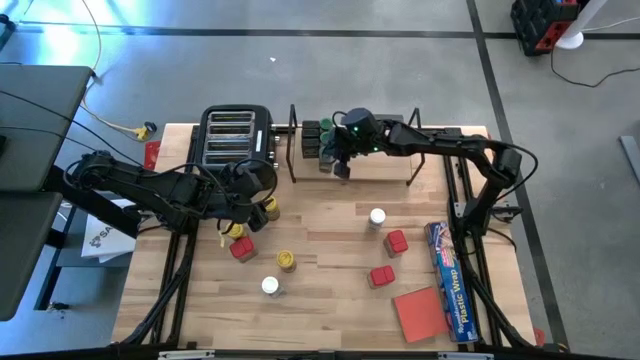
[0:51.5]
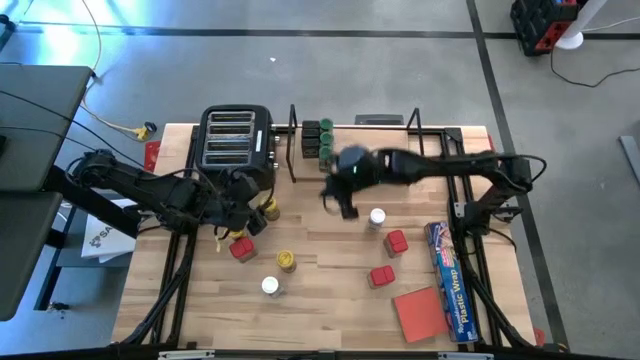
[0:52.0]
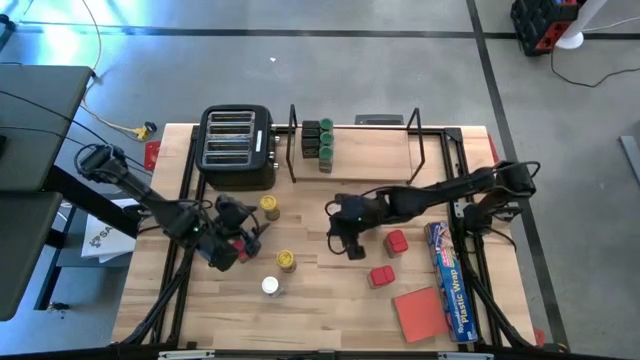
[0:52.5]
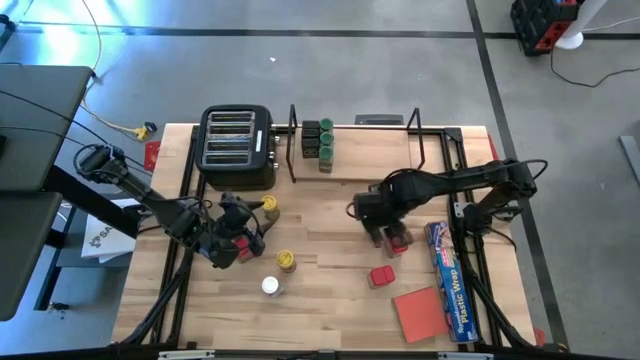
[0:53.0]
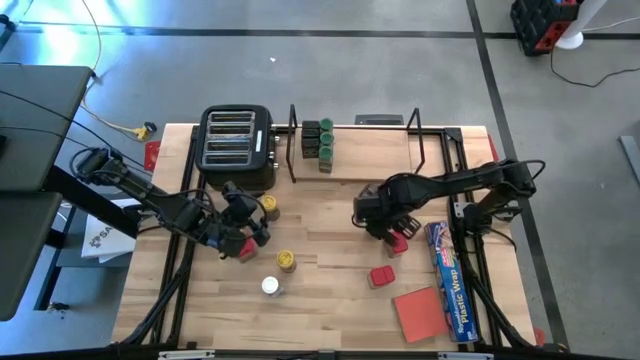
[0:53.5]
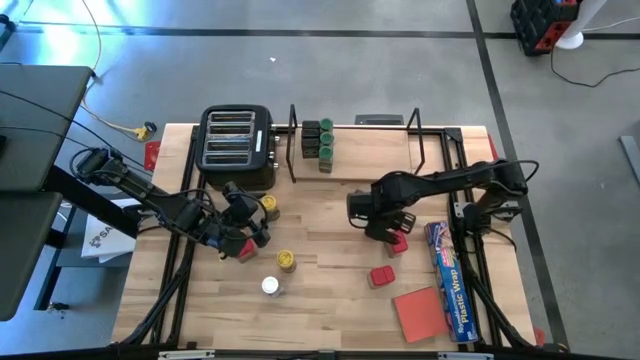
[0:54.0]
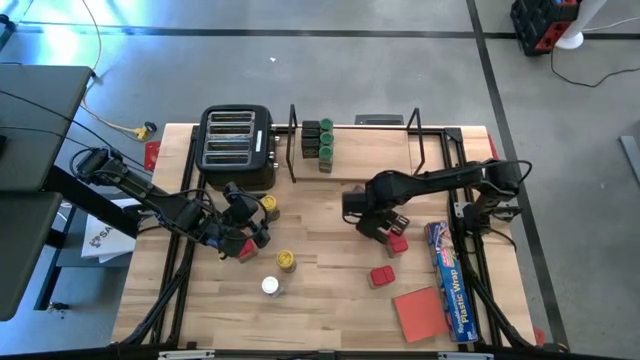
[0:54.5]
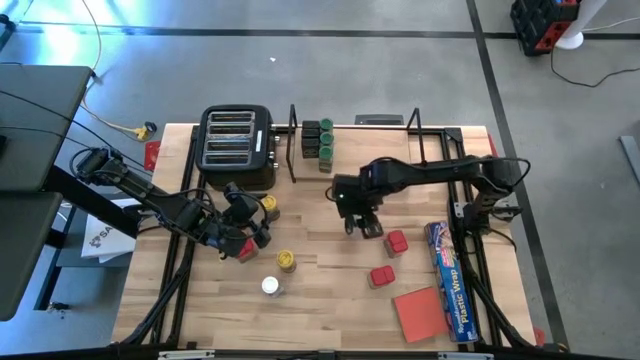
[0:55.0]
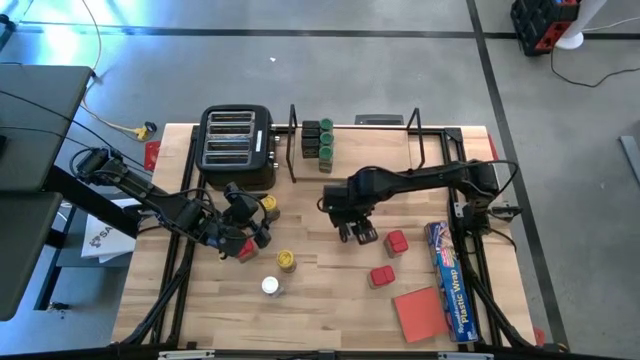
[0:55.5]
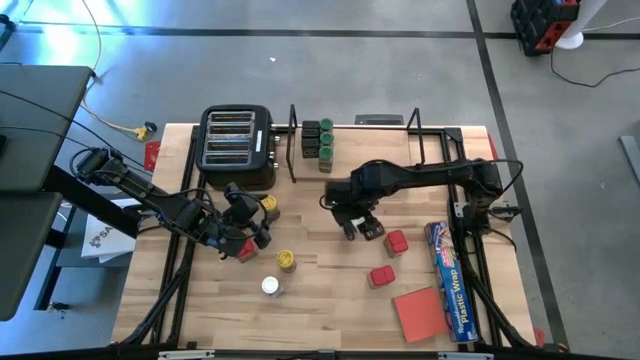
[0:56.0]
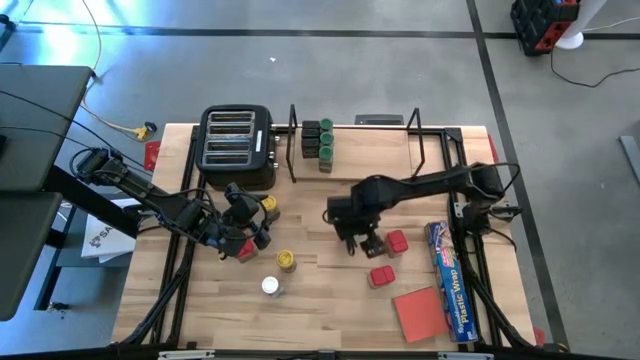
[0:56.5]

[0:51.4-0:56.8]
Task: Shelf spices
Put the top white seasoning bottle on the shelf

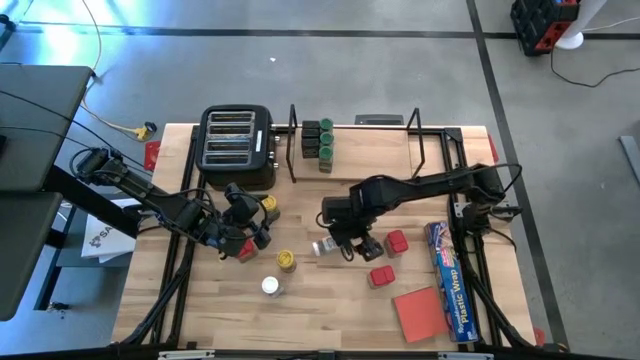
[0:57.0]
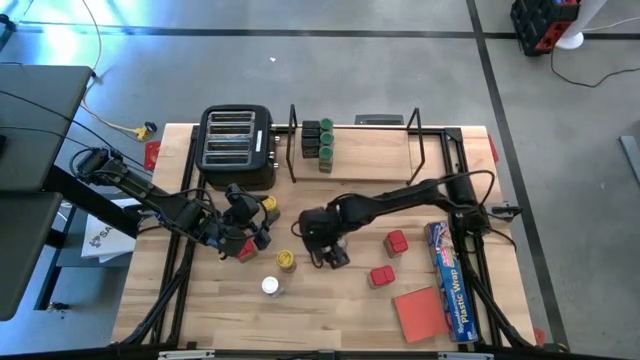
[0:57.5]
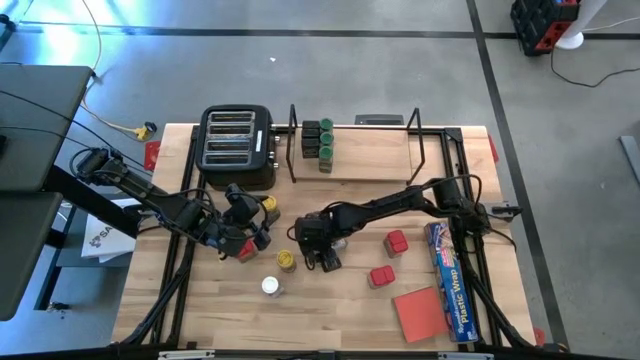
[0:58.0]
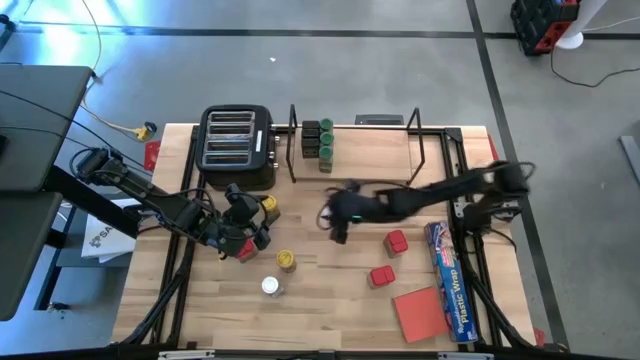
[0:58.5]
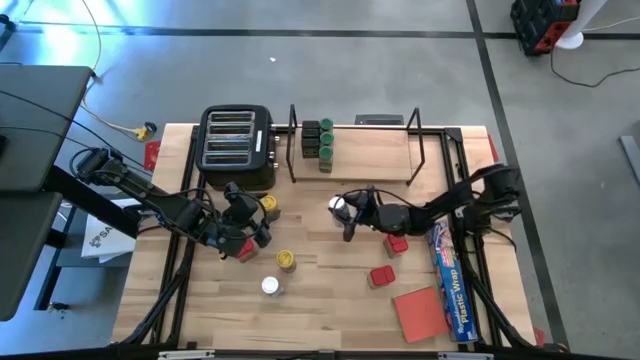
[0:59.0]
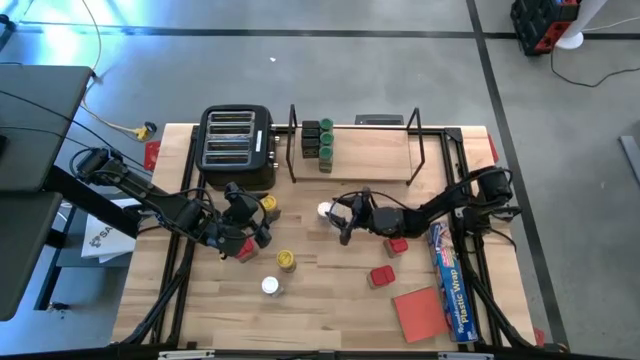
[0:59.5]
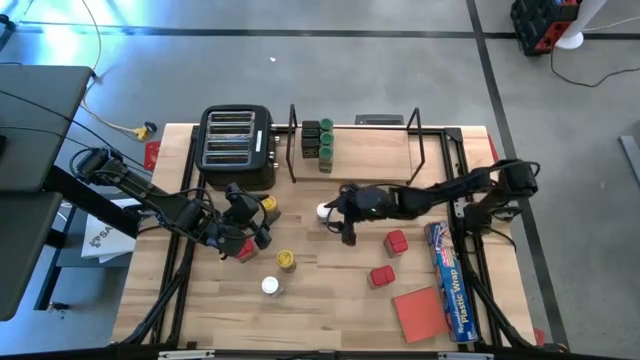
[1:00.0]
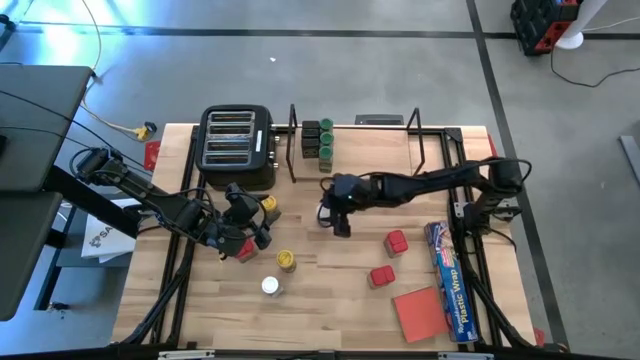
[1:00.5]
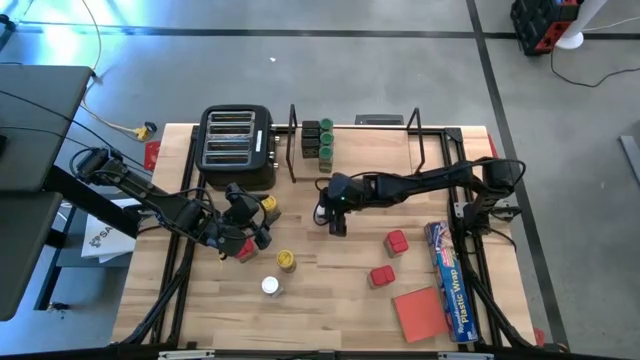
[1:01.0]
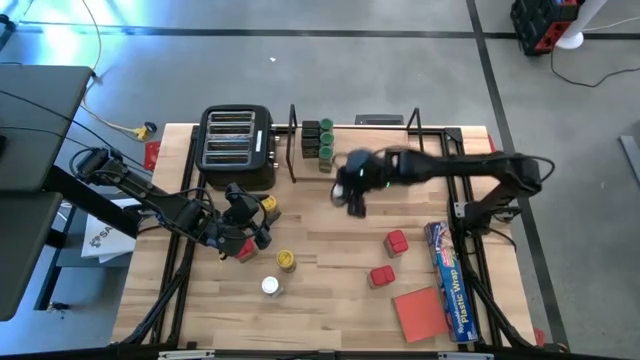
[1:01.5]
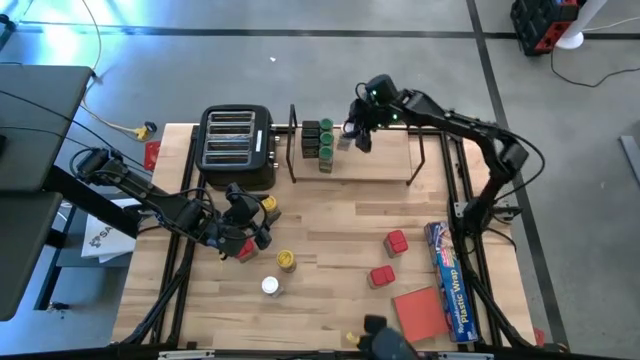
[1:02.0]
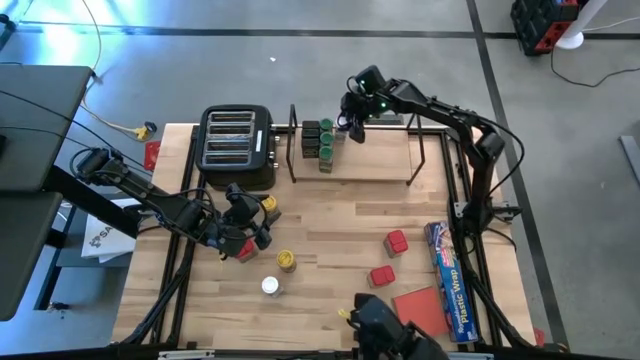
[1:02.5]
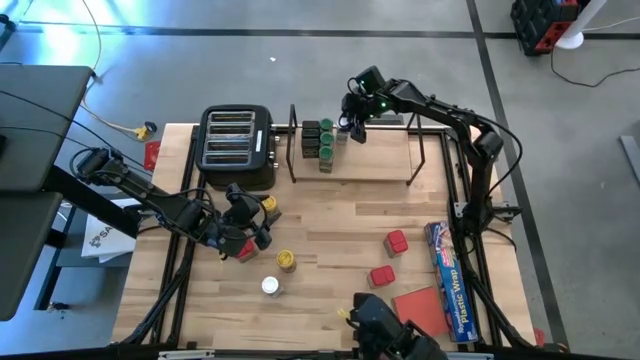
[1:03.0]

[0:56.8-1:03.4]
Put the top white seasoning bottle on the shelf

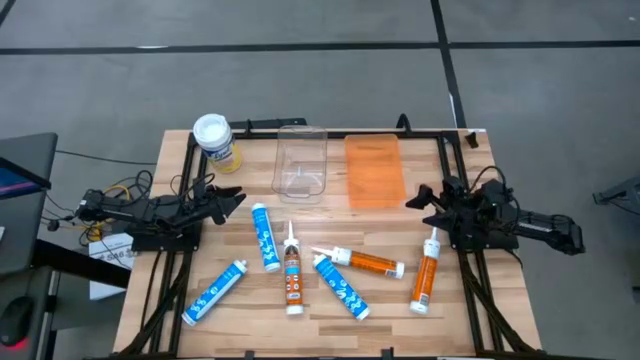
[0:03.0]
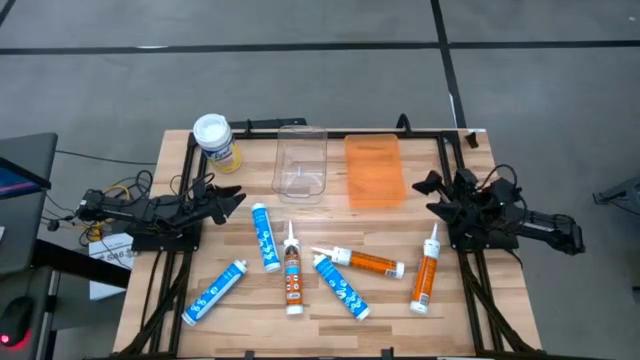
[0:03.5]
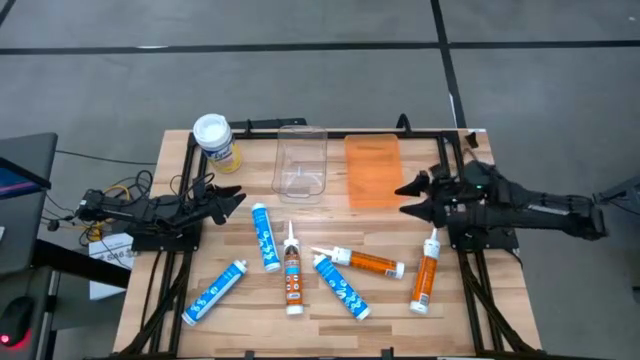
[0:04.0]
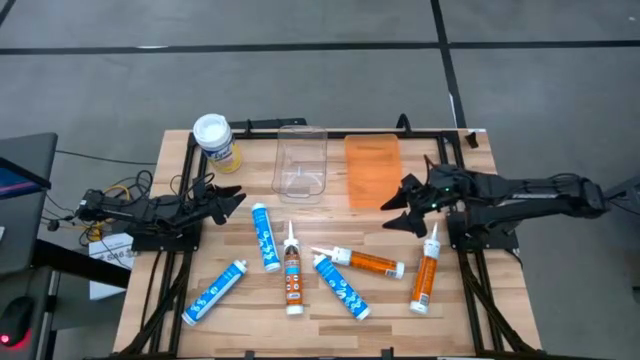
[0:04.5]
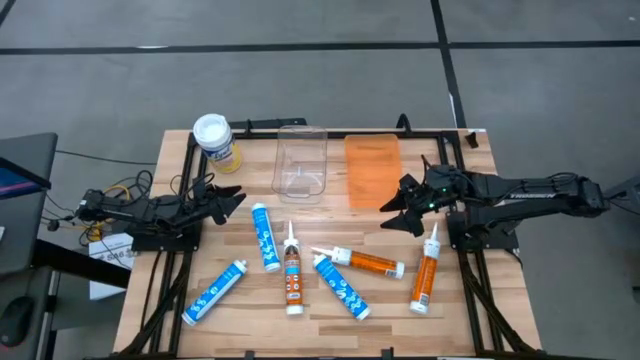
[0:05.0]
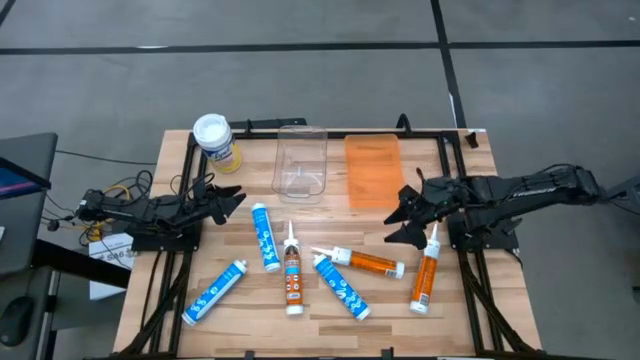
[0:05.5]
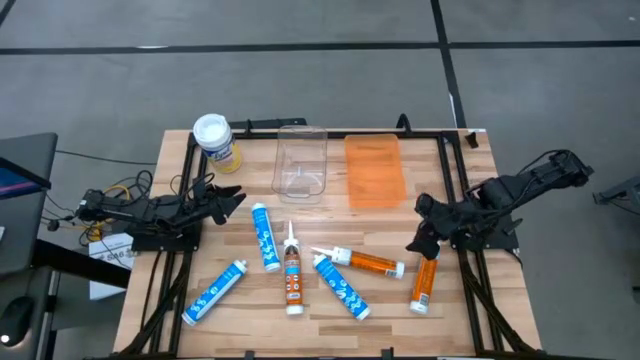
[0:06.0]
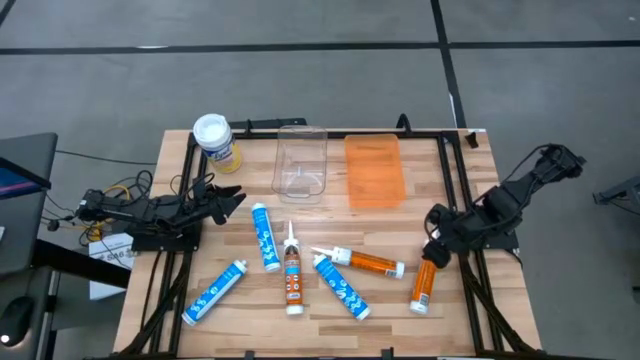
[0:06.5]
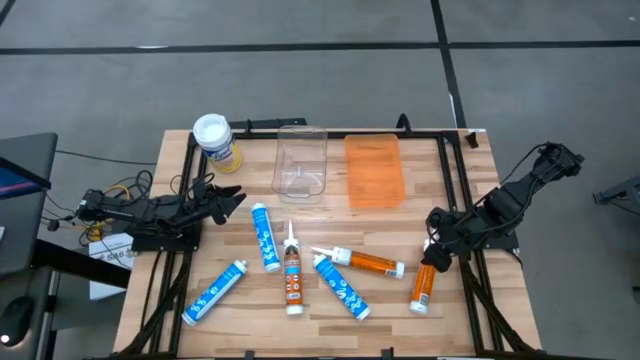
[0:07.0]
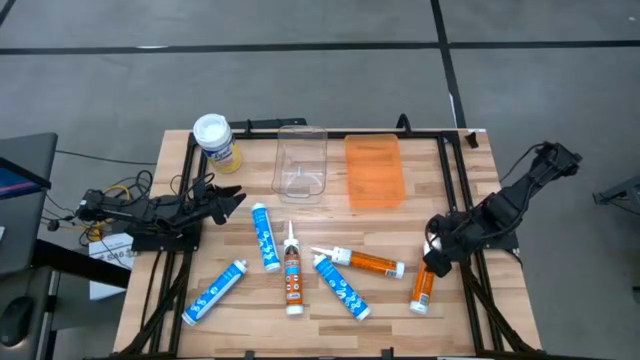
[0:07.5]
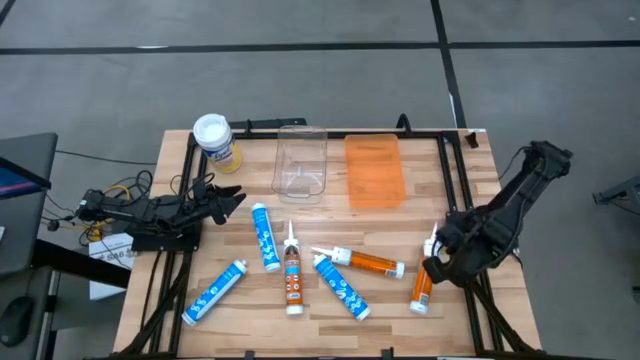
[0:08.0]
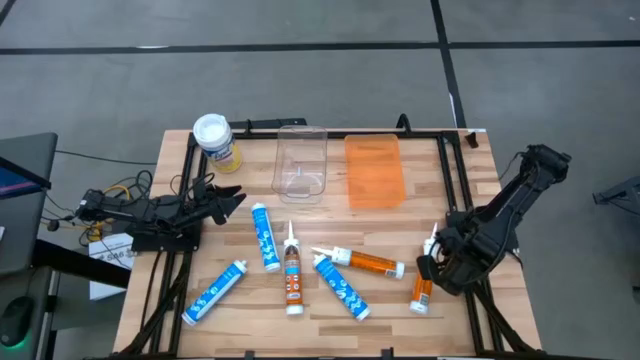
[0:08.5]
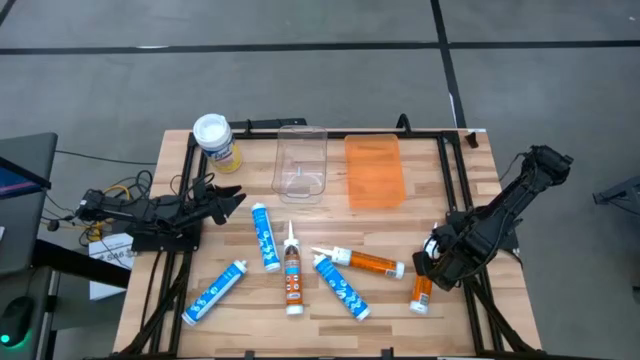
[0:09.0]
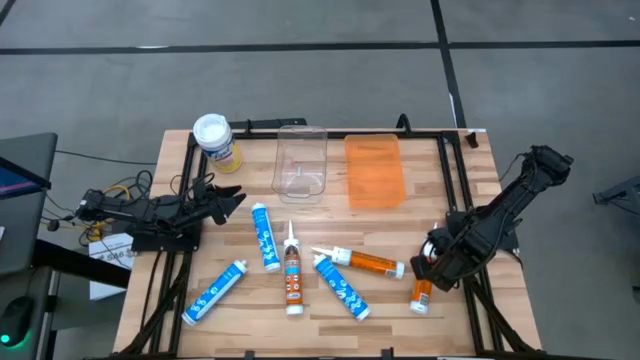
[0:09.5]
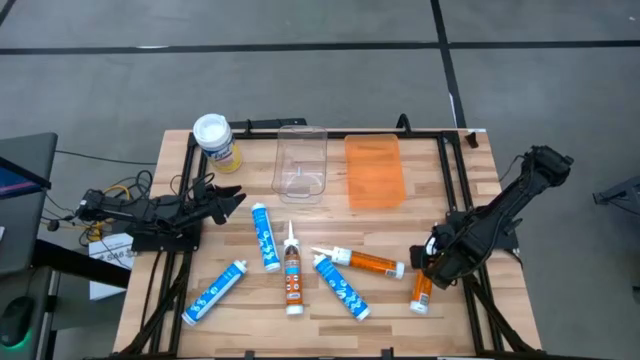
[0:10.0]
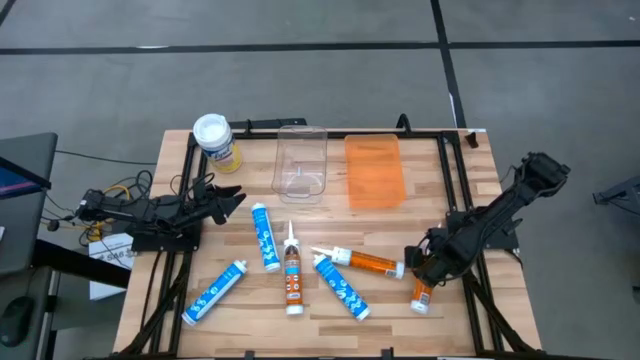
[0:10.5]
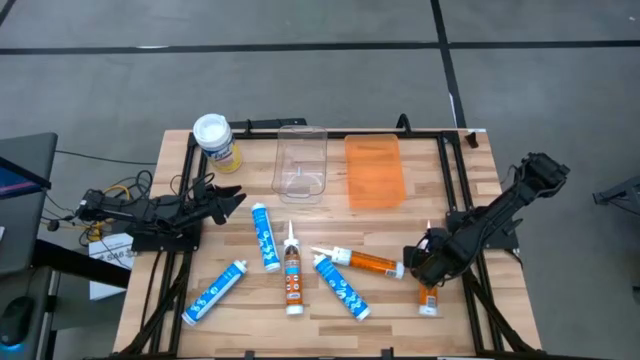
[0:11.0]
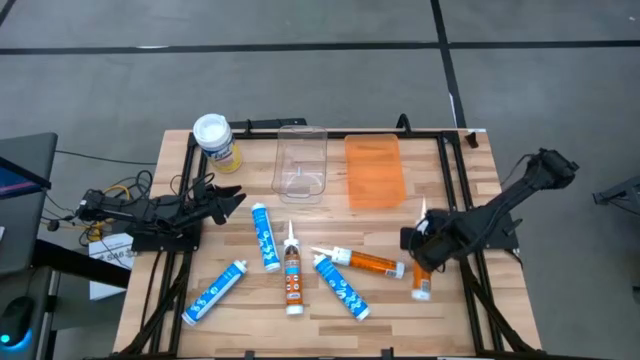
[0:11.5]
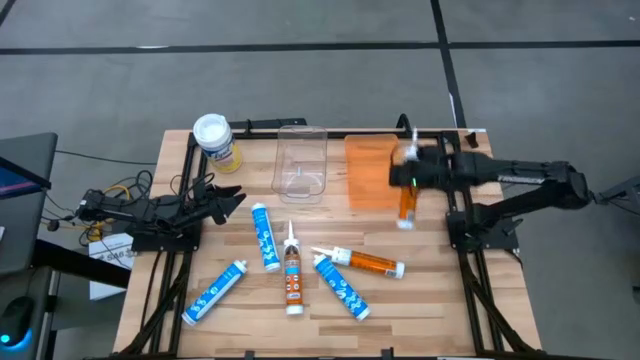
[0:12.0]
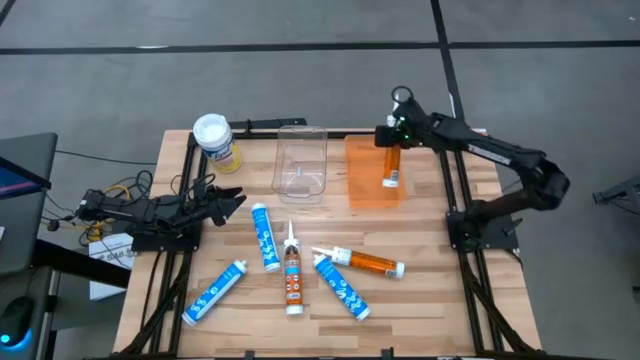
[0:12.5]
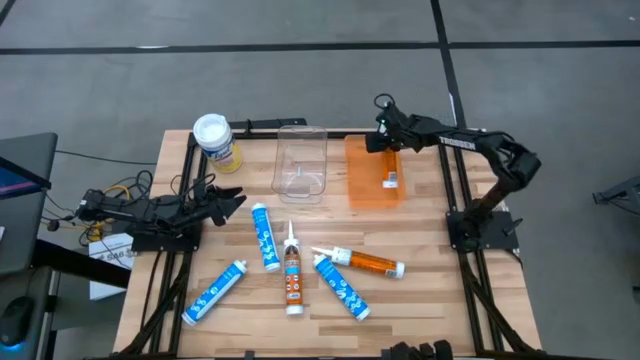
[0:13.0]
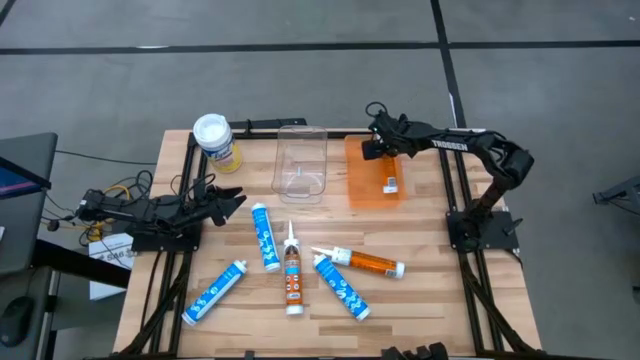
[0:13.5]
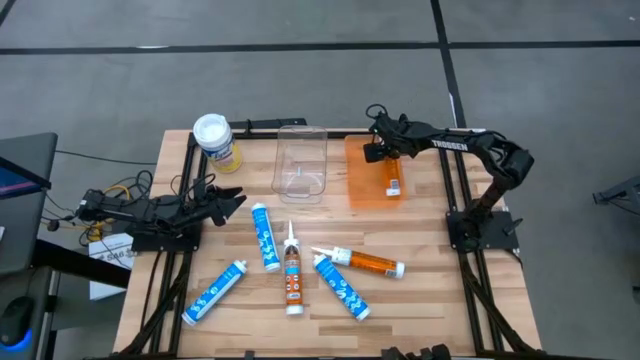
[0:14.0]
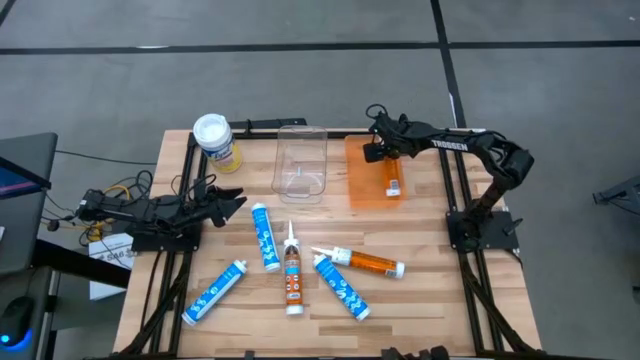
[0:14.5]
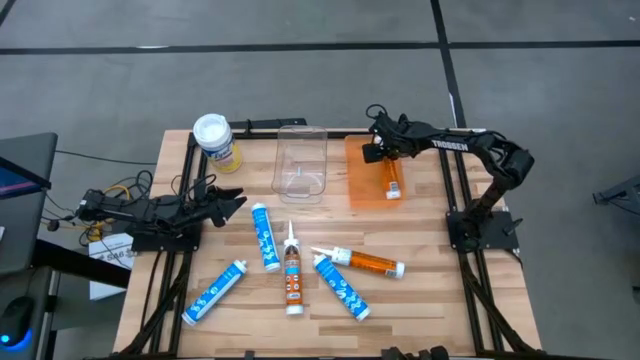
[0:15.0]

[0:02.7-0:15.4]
Task: Pick & place silicon tubes, Sealant and Lysol wipes
Put the right orange sealant into the orange bin
